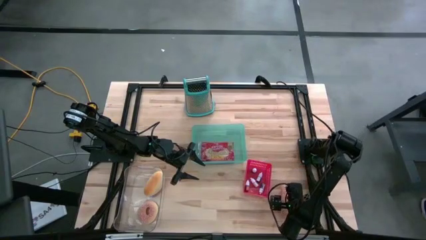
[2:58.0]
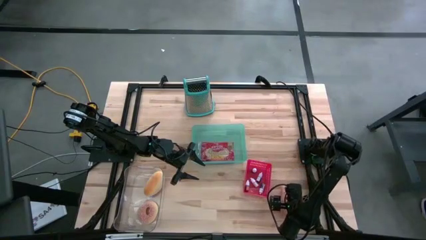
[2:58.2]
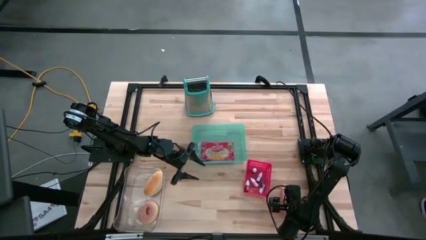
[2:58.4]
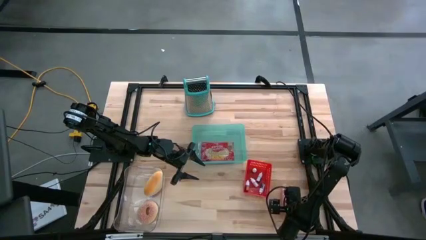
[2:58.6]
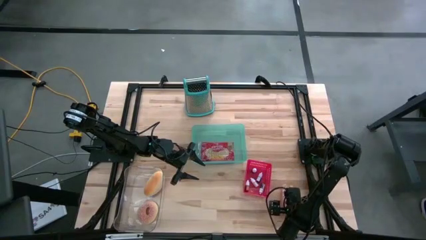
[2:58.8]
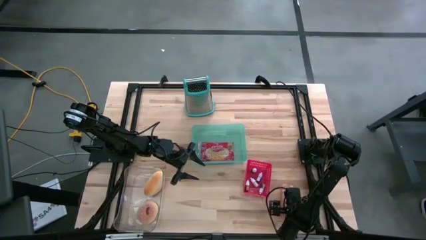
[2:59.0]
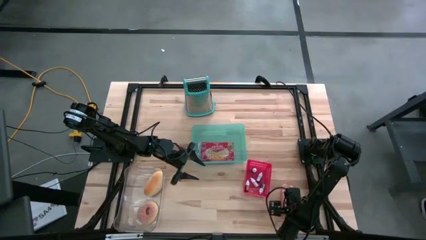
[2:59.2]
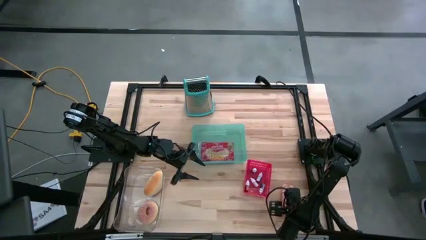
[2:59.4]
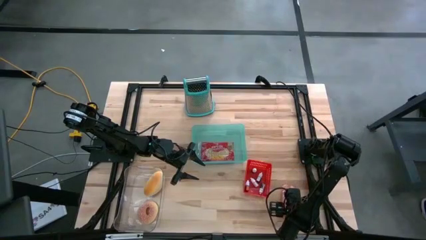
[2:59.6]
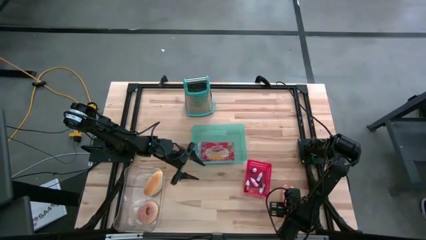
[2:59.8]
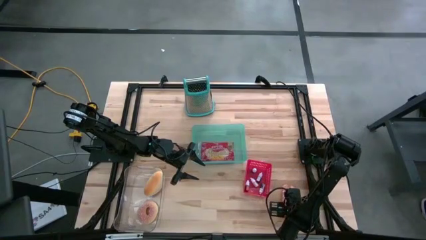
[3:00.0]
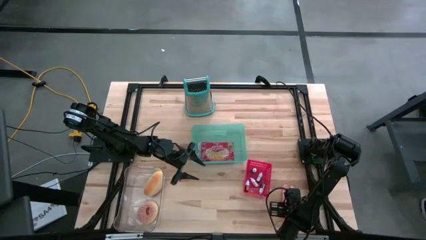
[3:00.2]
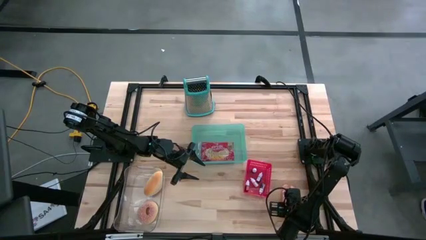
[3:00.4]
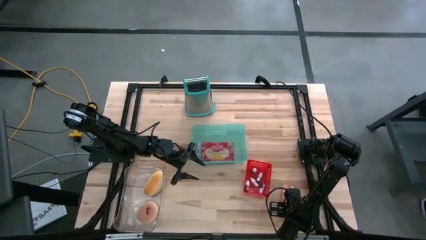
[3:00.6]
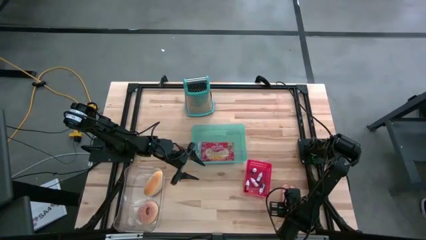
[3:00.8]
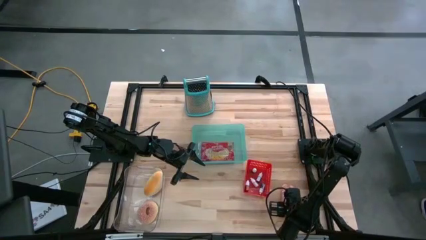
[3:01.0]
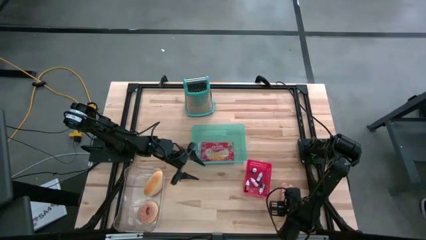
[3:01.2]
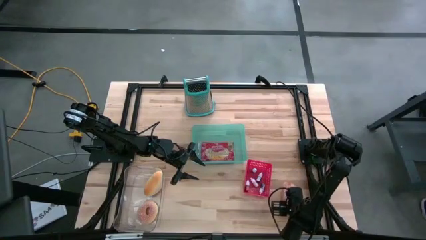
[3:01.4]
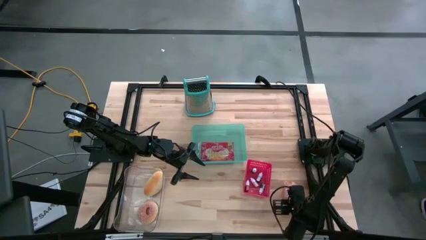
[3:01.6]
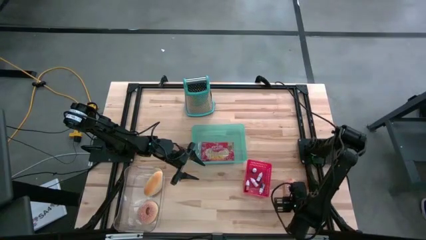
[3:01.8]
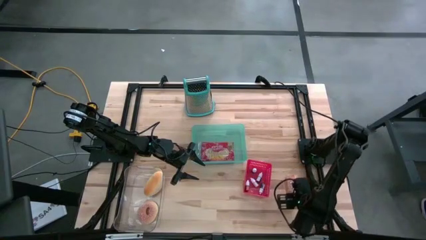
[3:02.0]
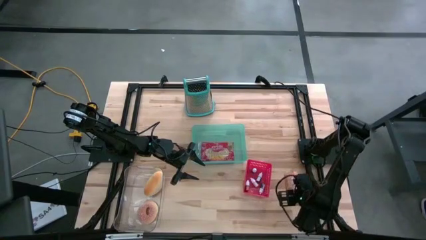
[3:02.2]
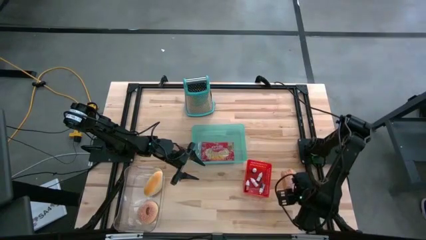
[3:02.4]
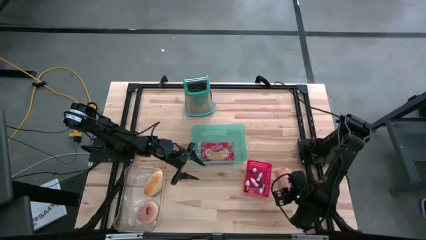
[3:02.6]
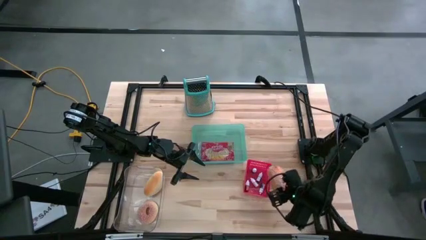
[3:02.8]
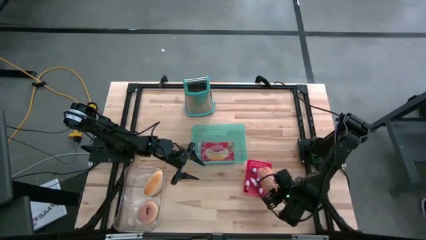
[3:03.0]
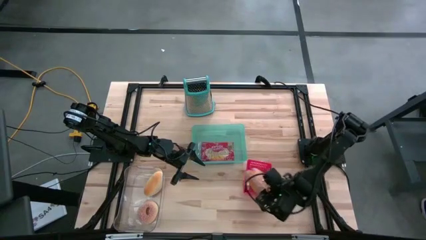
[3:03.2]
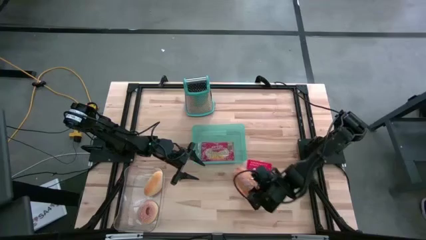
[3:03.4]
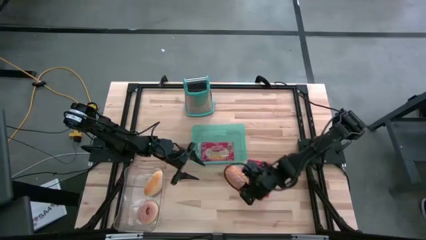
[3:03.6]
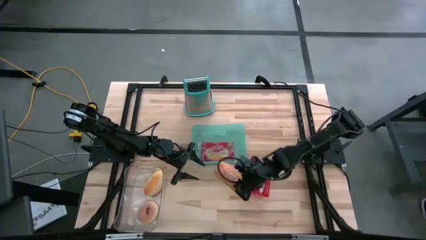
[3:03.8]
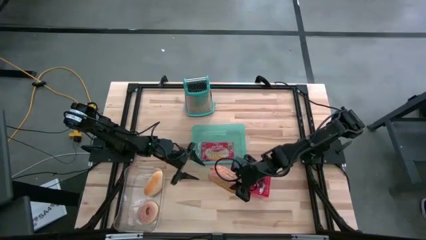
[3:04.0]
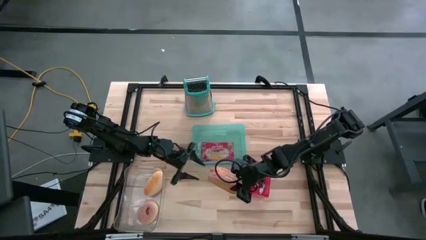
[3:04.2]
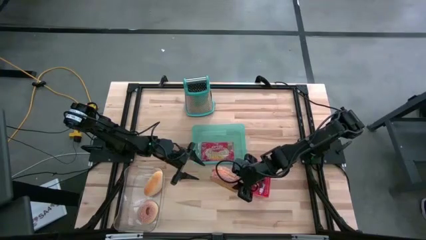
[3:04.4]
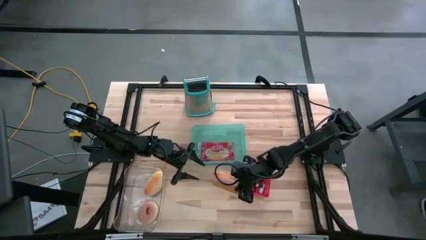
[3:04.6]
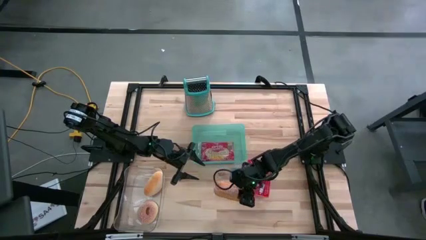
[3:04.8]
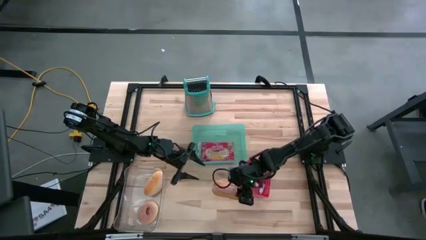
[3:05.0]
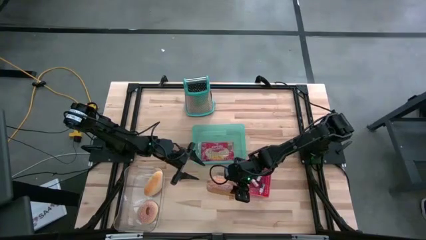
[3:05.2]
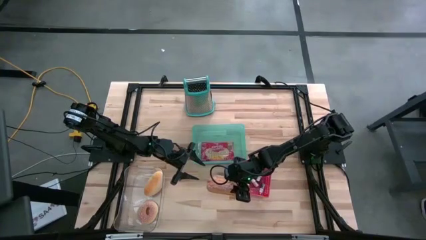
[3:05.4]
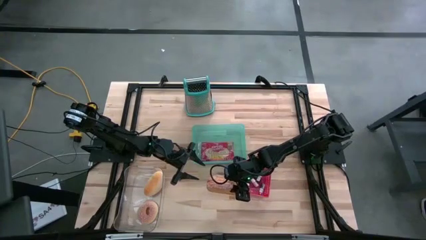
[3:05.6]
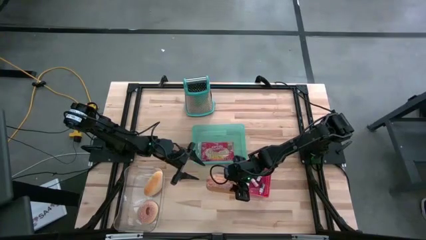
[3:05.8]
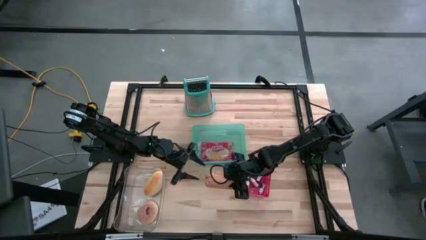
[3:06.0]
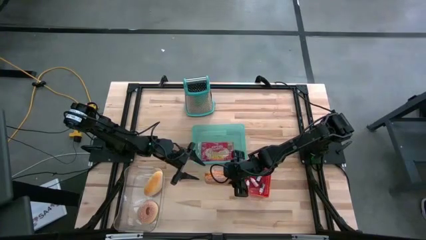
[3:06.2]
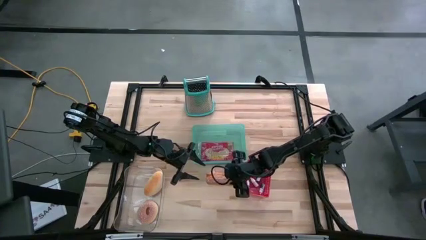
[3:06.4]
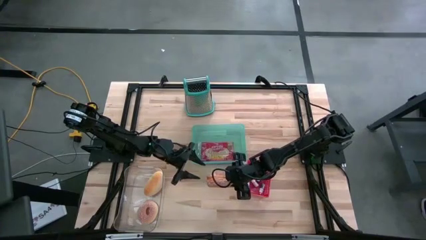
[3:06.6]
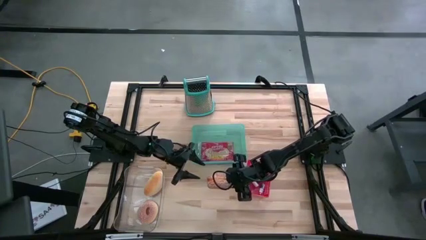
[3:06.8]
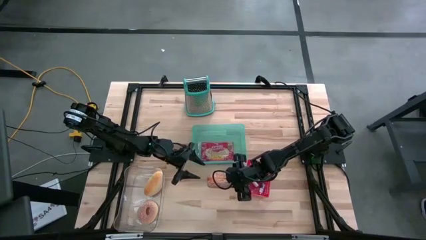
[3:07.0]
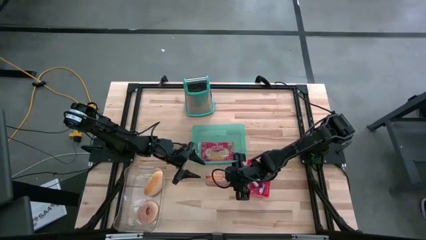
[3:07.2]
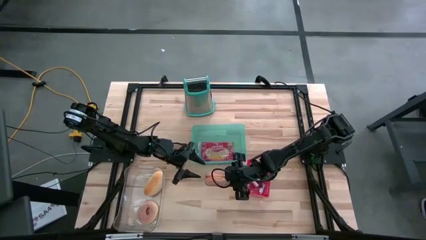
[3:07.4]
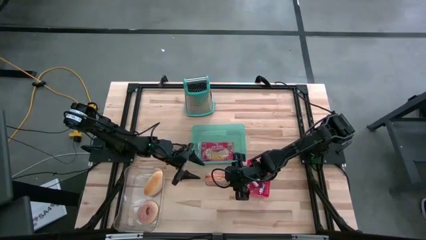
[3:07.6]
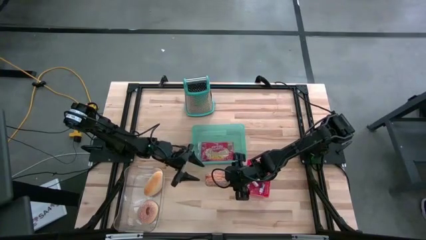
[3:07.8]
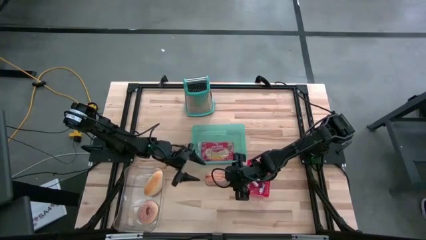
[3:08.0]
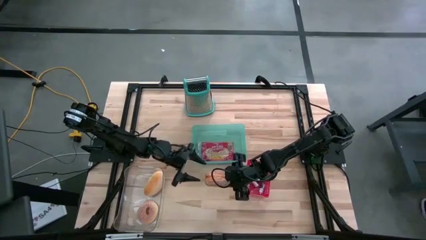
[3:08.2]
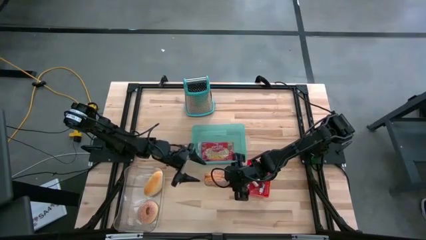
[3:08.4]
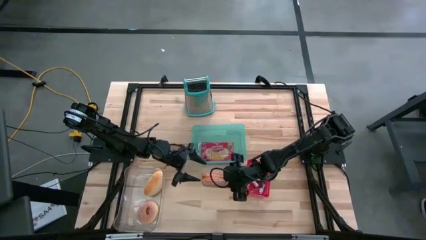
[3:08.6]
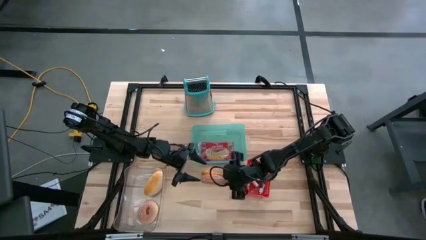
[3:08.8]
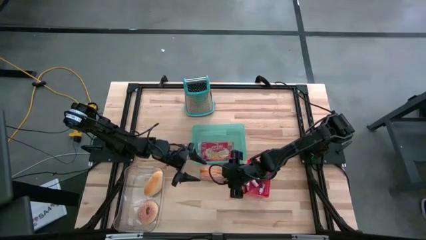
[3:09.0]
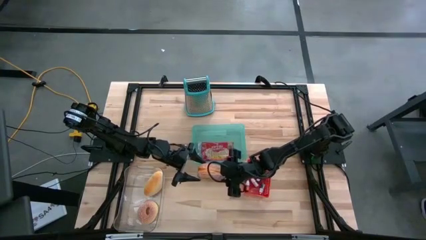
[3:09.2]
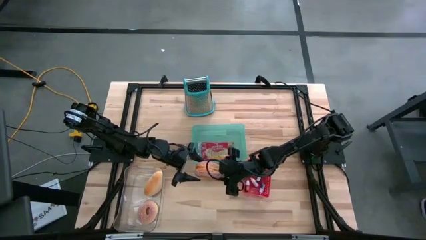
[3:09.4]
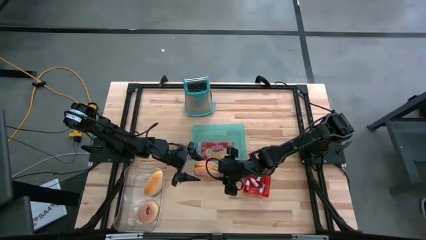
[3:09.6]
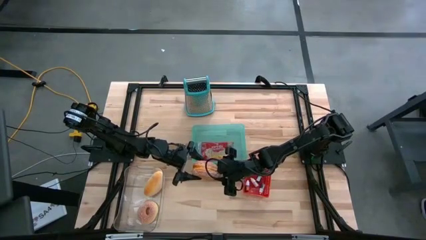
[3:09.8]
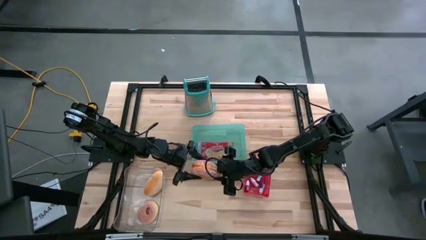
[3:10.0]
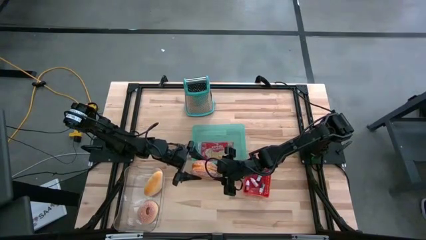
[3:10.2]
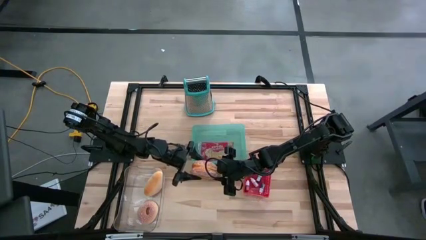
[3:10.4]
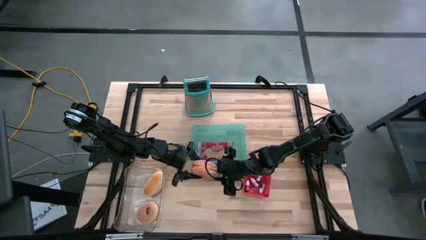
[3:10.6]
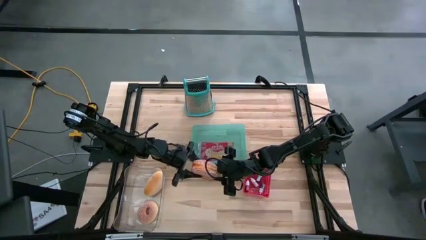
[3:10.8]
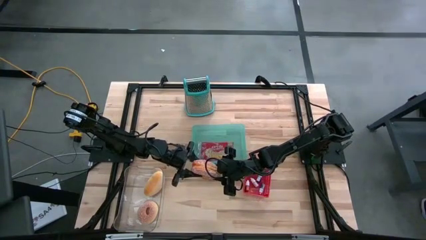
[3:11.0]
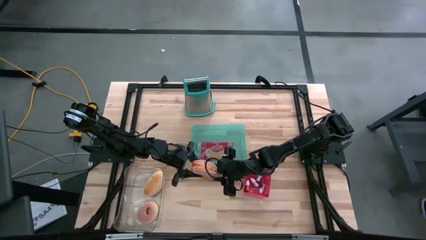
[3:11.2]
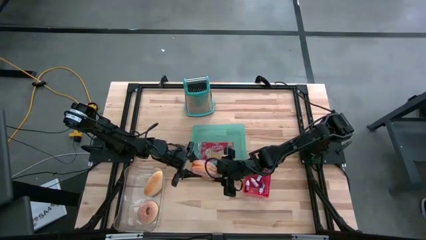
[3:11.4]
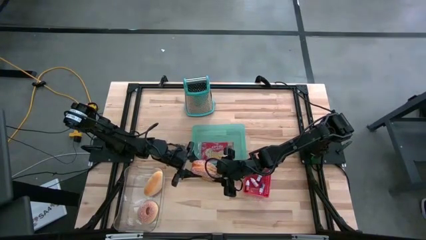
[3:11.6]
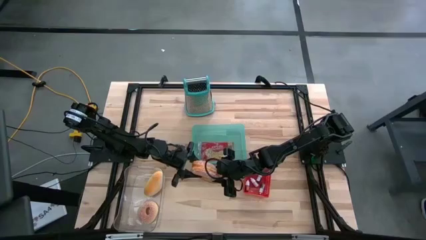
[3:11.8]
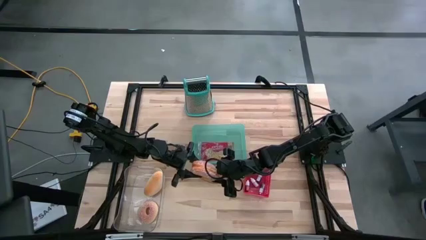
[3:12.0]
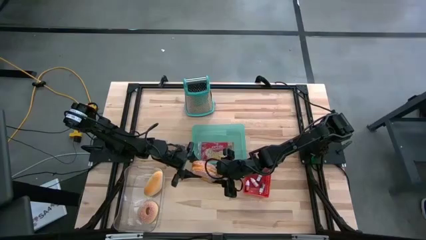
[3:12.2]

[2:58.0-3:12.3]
Task: Pick & Place Food Item
Put the bread into the transparent bin
